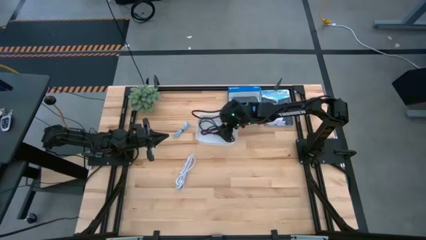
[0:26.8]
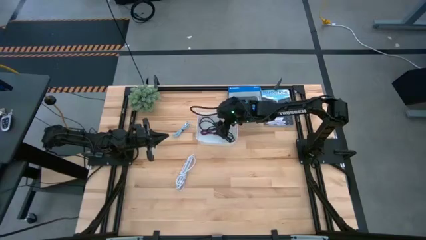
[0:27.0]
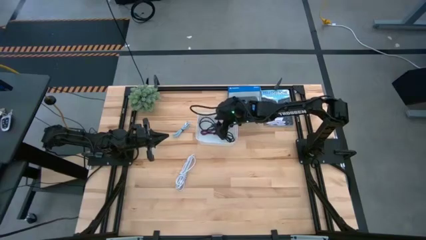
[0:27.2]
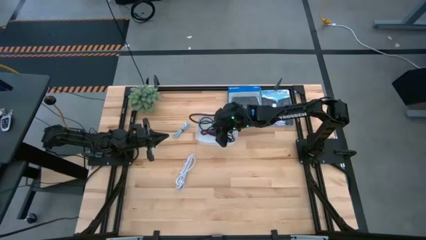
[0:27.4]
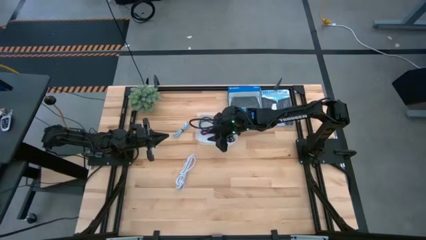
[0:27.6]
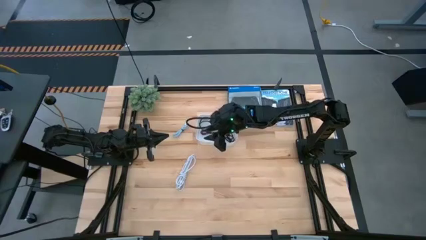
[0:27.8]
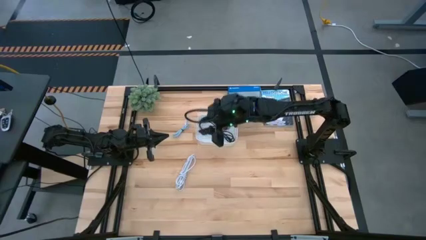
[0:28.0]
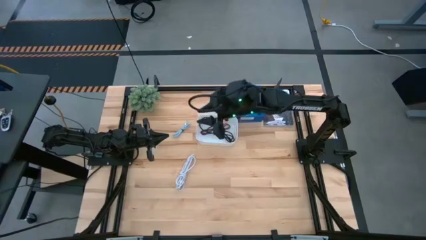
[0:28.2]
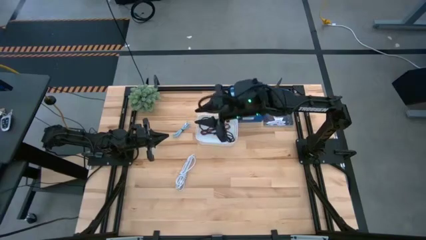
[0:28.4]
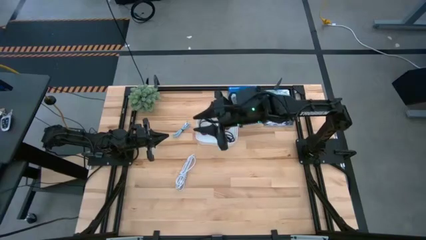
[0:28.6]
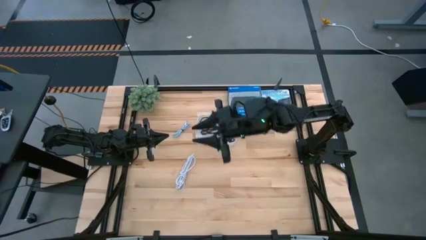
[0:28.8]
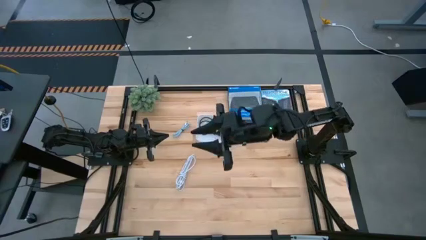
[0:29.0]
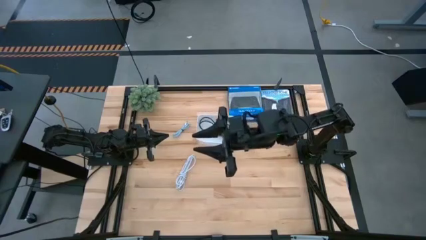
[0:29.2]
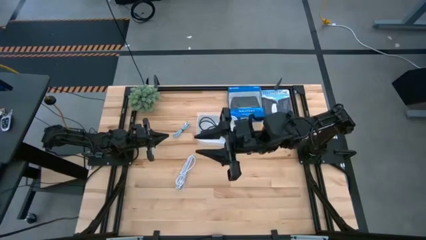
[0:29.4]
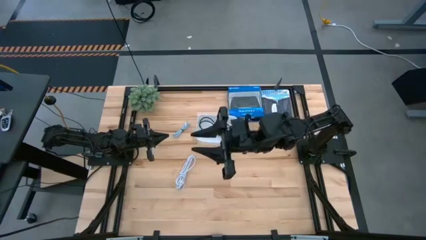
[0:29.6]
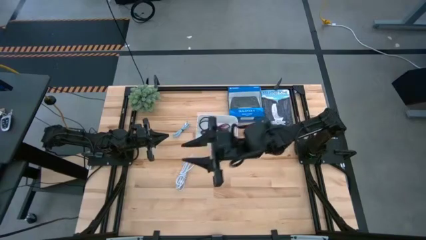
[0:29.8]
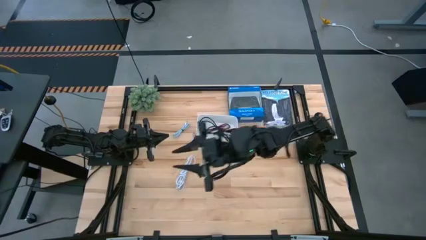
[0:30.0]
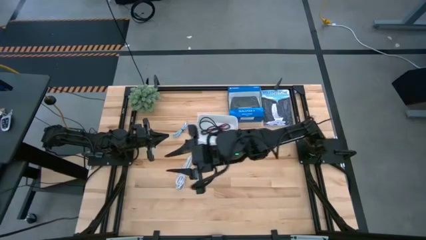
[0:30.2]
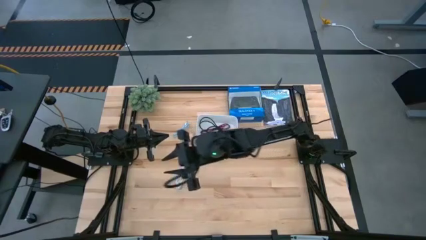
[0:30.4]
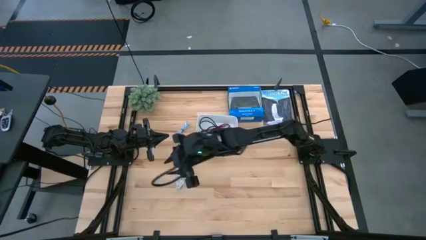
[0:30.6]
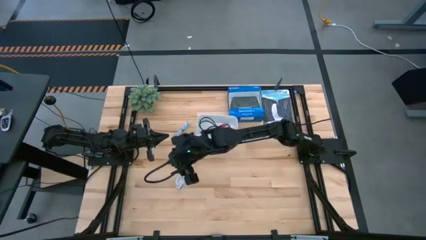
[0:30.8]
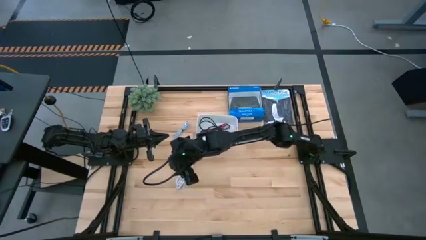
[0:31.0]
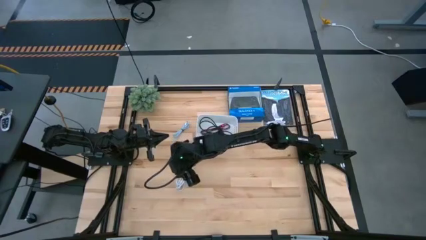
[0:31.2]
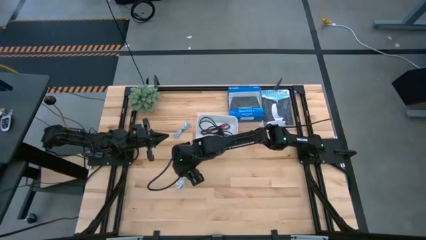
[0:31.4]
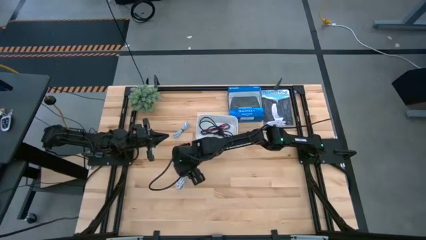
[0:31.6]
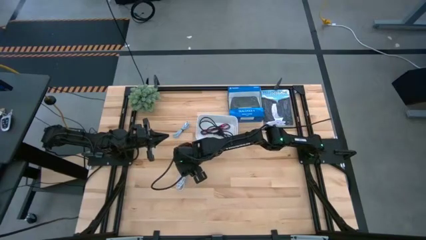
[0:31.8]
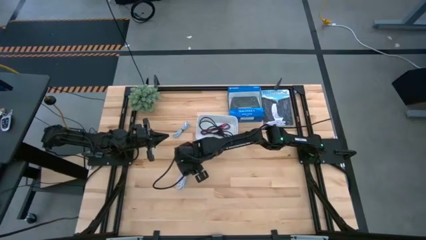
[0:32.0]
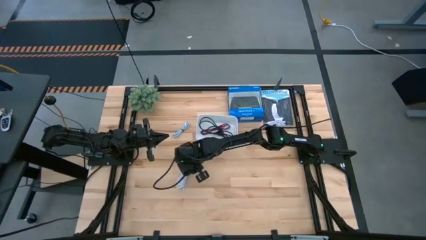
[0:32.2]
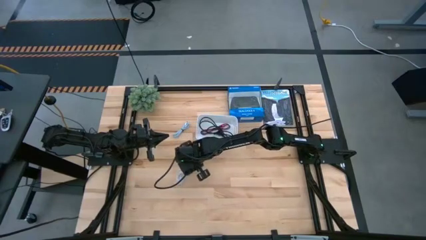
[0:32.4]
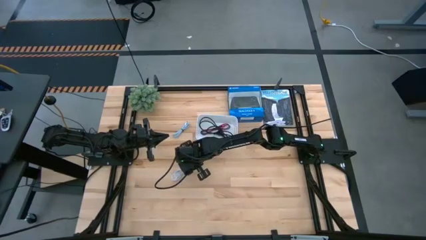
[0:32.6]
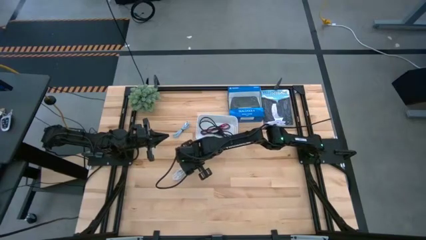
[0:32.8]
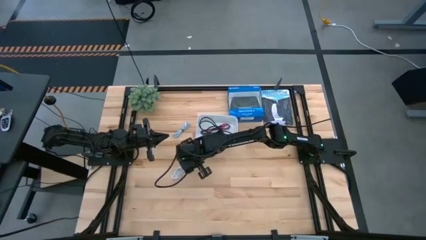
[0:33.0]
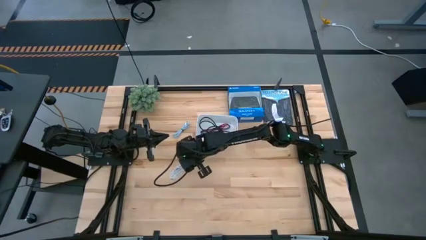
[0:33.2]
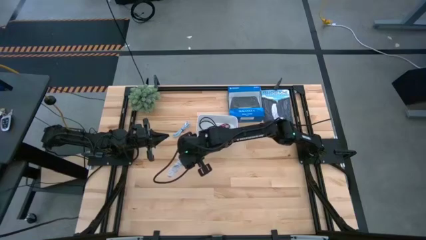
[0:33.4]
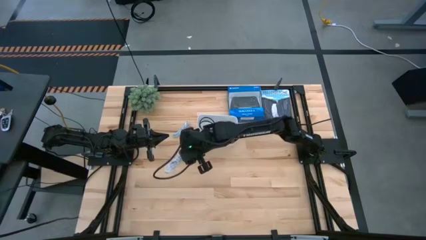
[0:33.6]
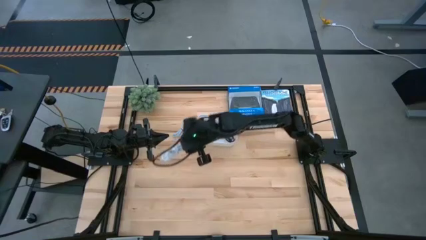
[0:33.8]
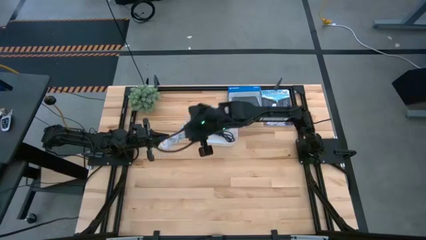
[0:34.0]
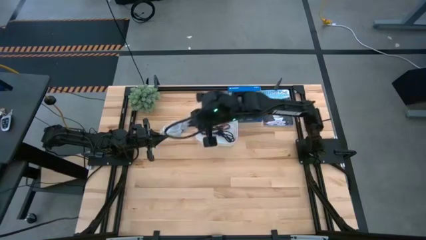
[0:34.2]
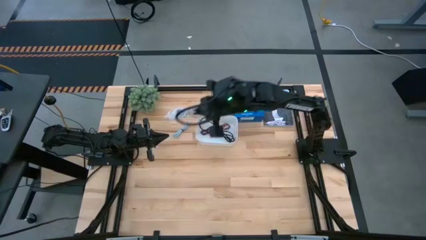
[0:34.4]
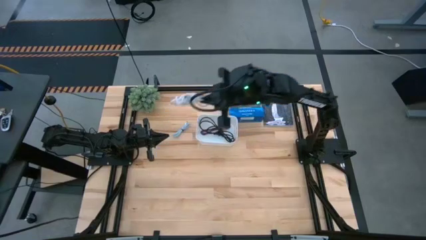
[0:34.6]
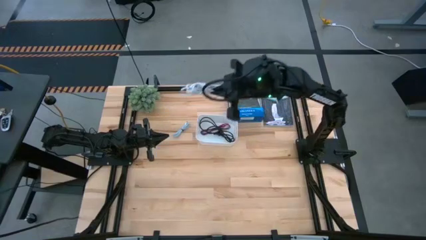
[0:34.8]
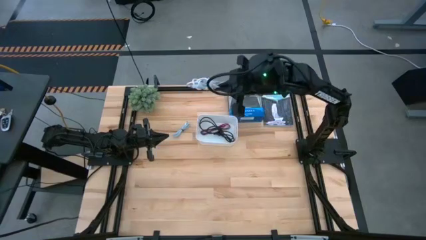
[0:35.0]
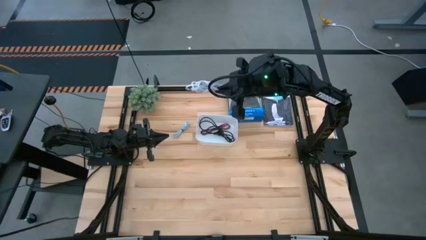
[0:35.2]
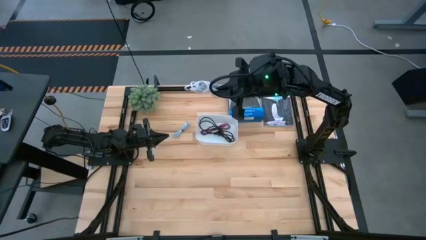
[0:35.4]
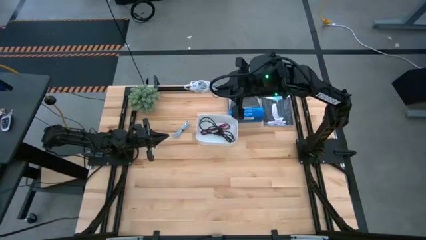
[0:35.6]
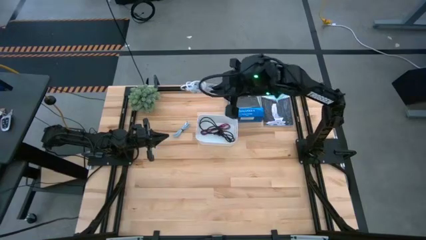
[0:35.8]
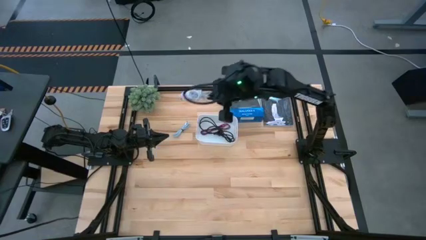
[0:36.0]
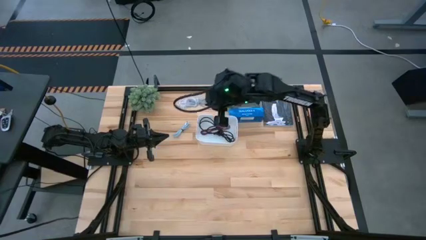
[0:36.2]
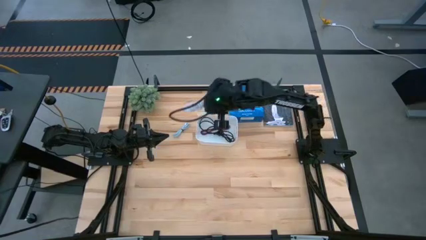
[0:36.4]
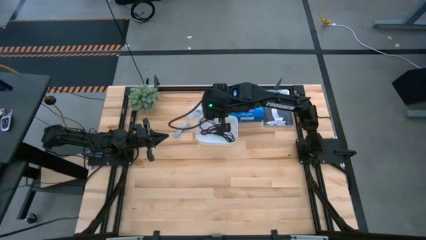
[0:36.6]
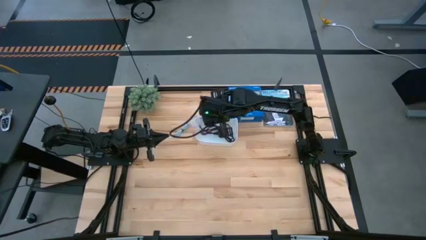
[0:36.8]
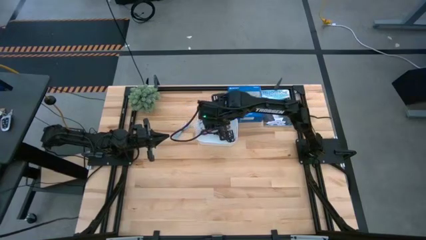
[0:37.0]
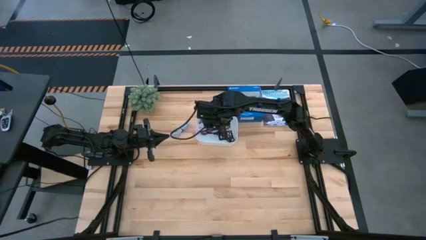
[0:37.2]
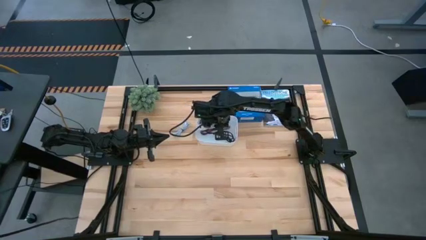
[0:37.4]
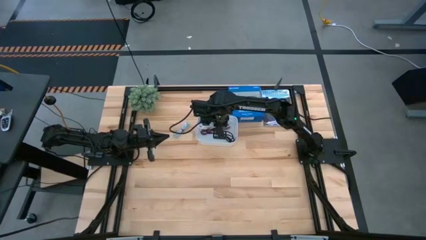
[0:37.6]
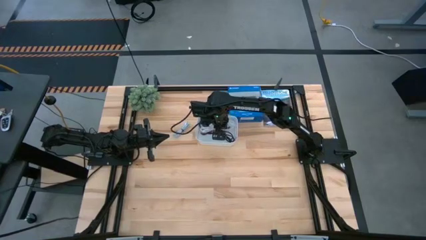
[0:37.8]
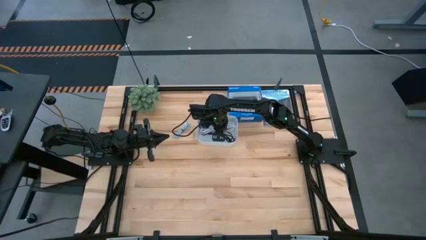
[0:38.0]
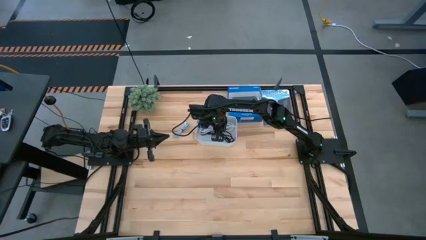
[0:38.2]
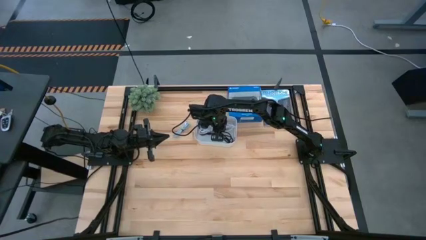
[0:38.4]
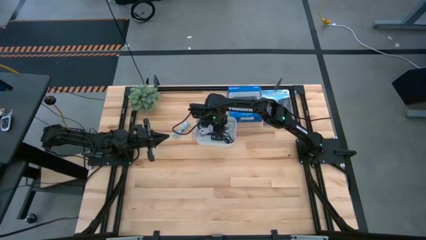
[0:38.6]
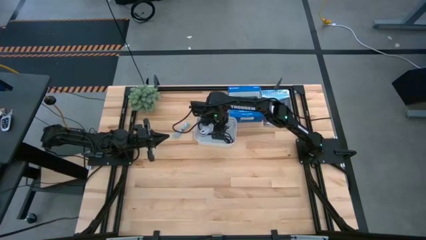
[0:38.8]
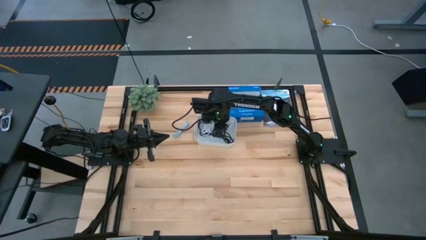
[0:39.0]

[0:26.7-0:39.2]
Task: Pick and place USB-C Cables
Put the white charger cable into the white bin

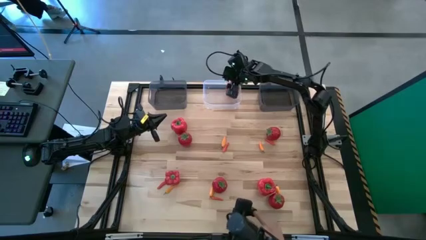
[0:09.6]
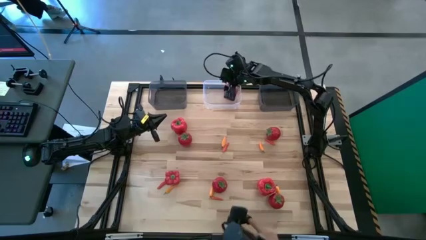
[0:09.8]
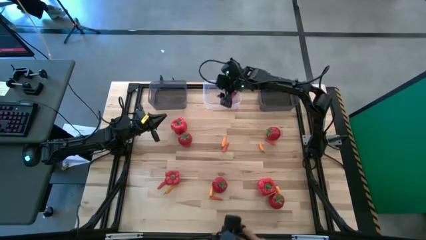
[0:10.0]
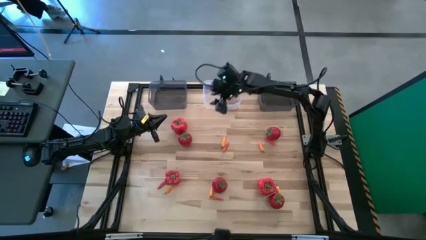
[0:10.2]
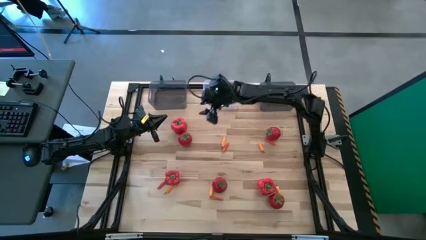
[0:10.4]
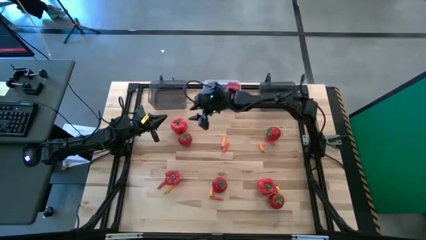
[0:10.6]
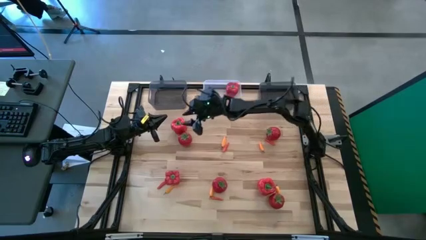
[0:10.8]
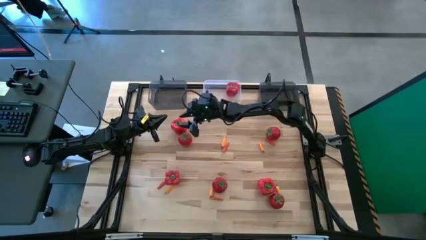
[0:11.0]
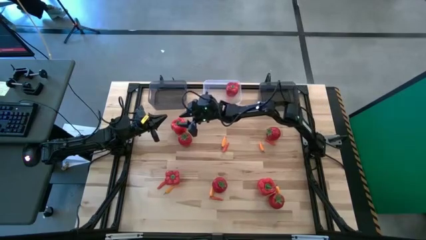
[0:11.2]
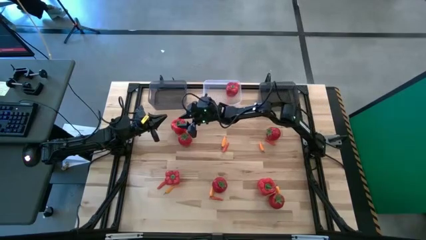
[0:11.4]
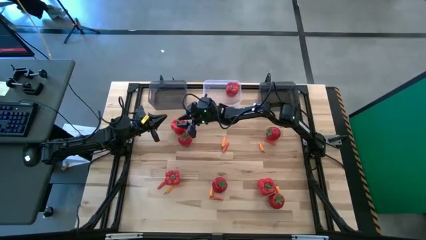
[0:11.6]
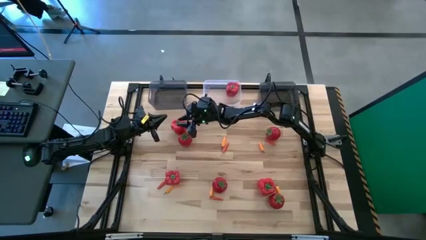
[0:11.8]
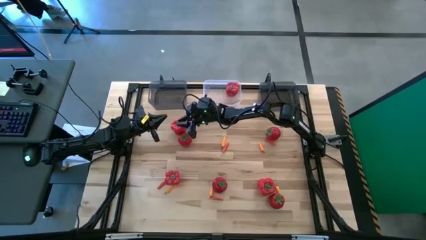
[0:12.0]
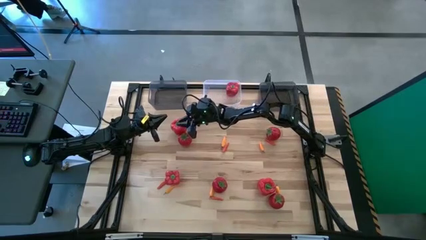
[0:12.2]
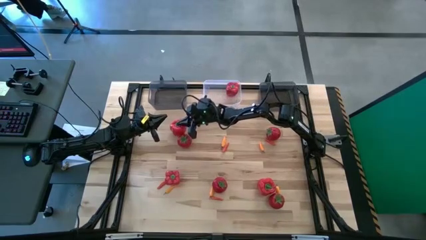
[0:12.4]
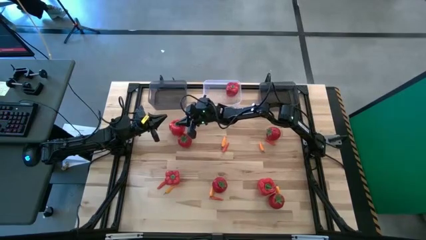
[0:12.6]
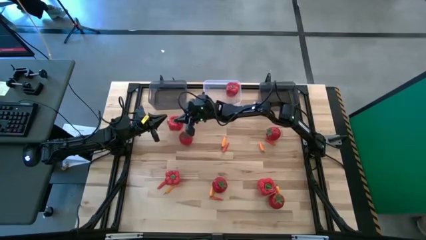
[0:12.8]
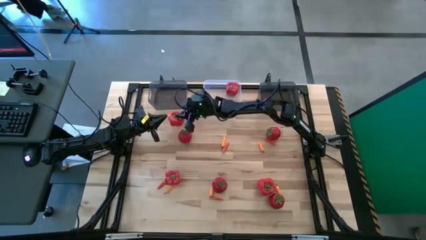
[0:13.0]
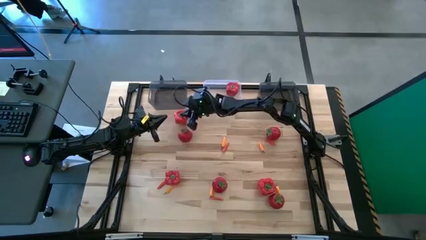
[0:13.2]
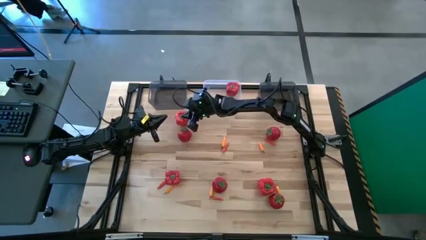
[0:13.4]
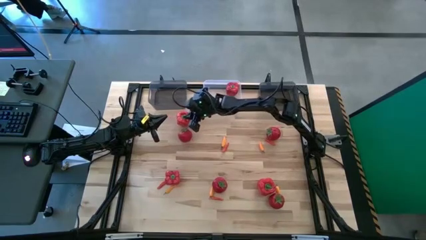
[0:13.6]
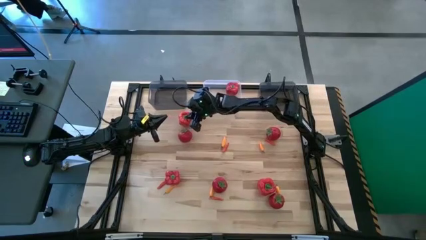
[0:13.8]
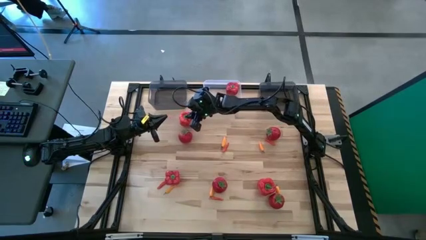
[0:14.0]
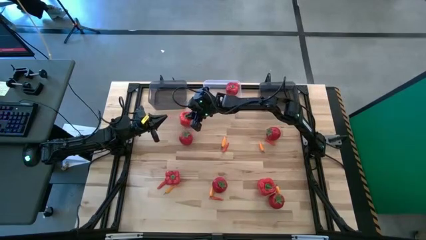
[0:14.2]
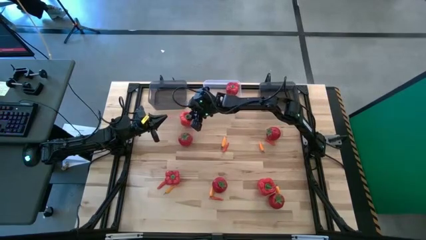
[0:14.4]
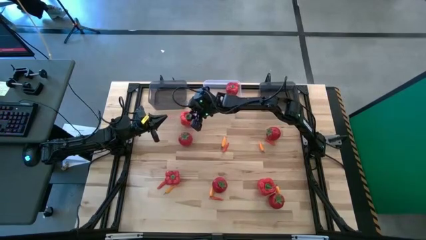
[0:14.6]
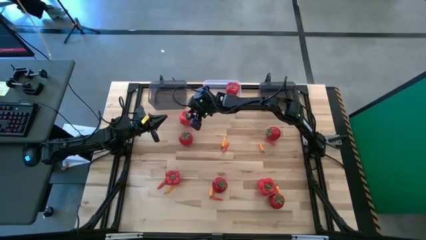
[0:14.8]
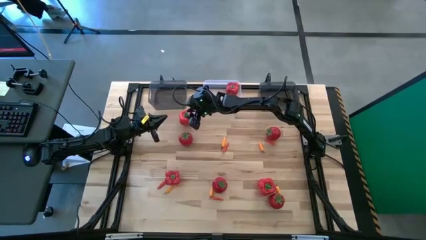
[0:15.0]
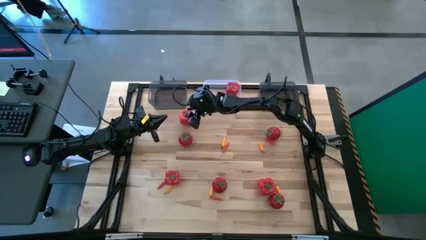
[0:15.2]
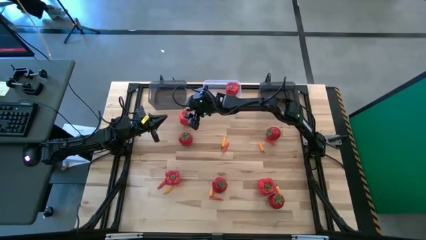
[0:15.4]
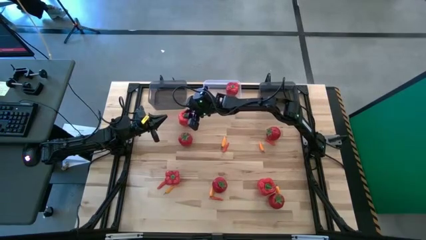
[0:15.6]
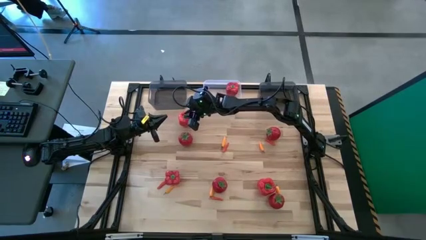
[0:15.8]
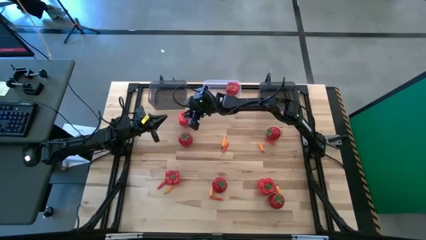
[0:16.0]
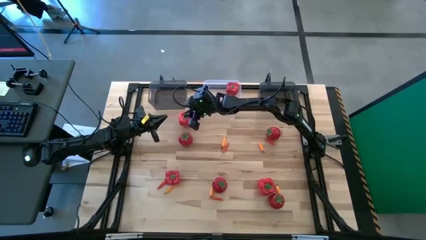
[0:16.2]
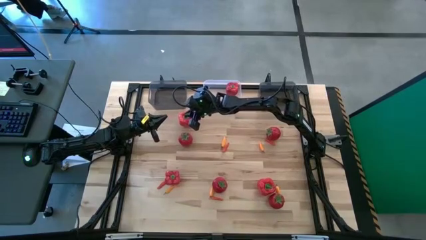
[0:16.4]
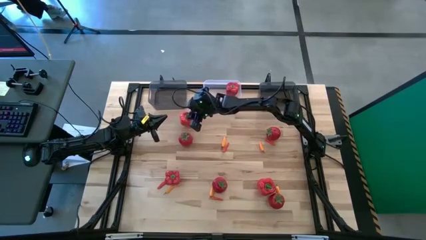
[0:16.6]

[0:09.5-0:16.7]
Task: Sort produce into baskets
Put the red bell pepper into the transparent bin
